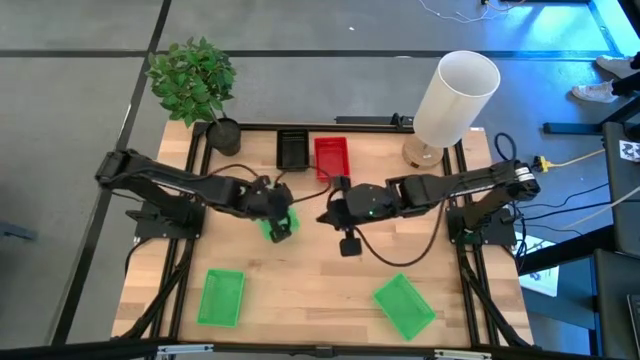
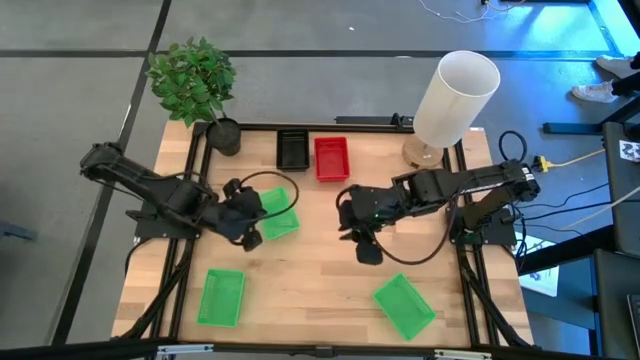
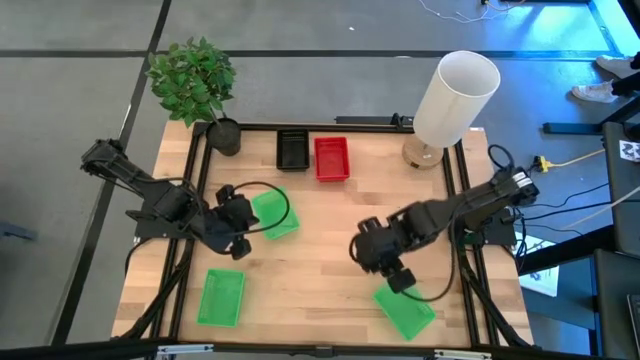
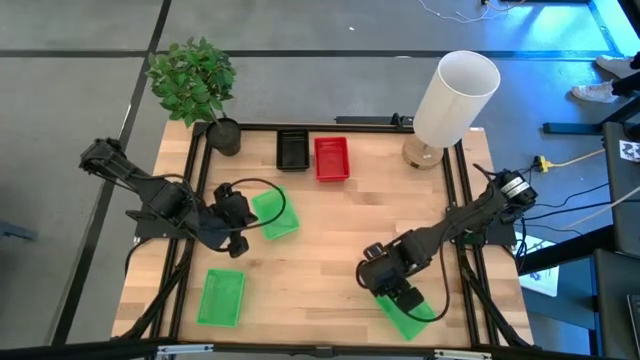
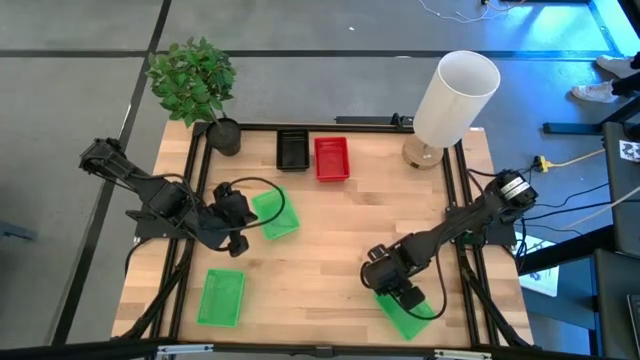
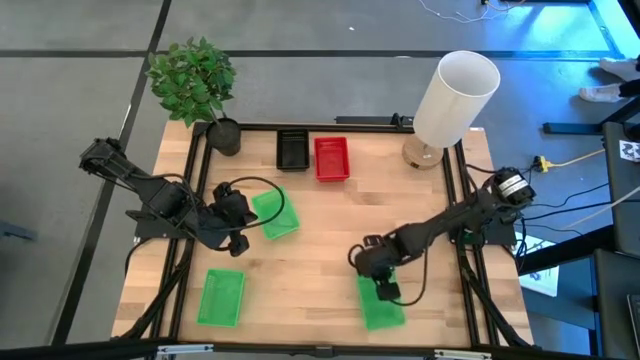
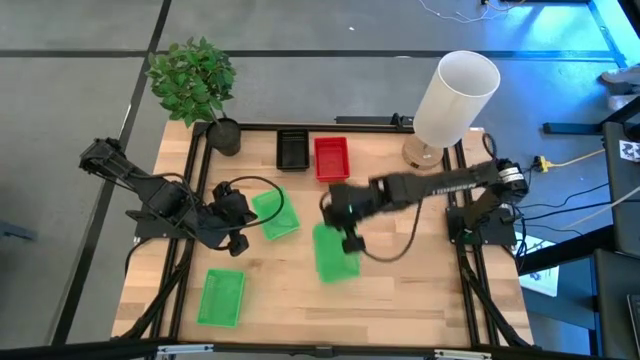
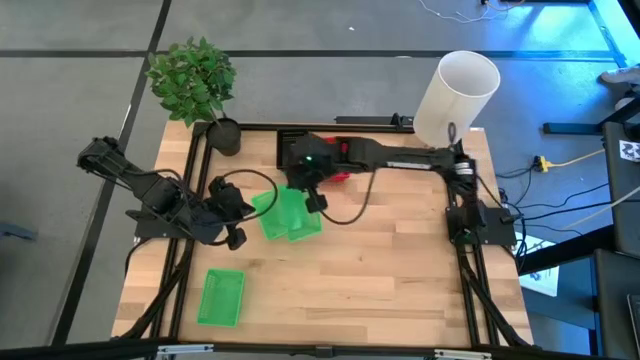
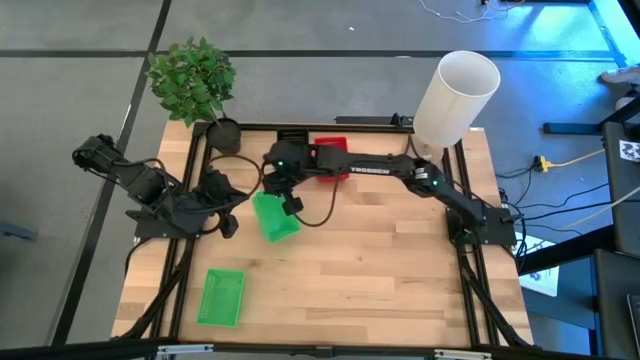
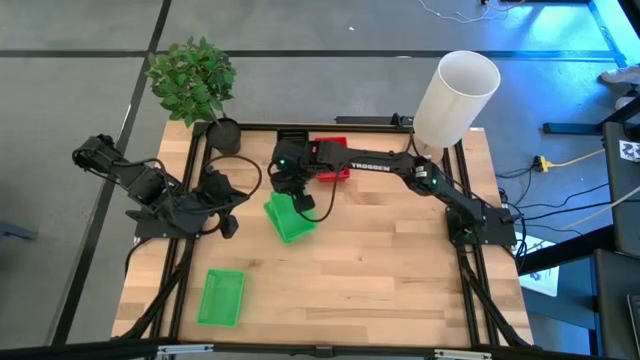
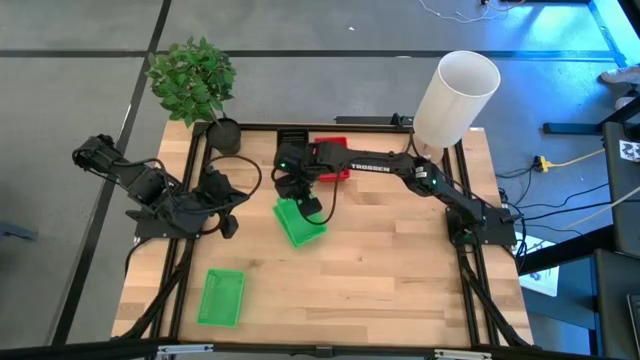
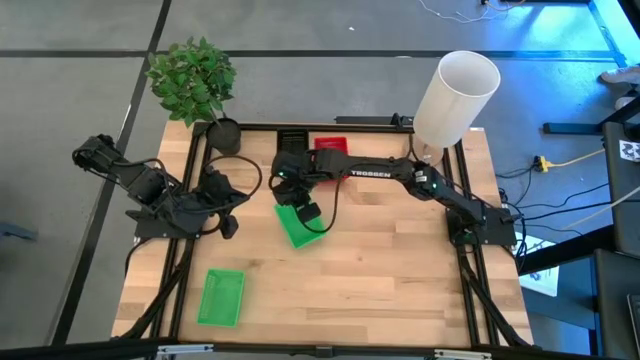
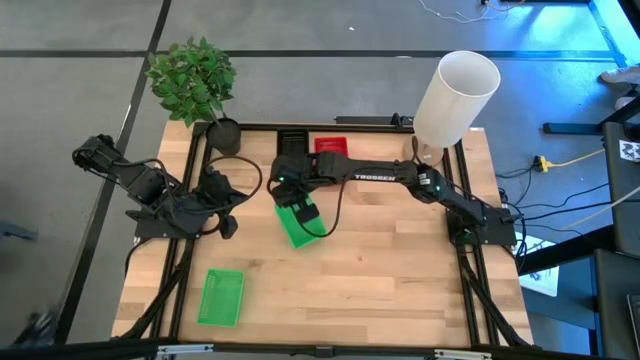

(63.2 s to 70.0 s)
Stack the bottom right green bin on the top left green bin

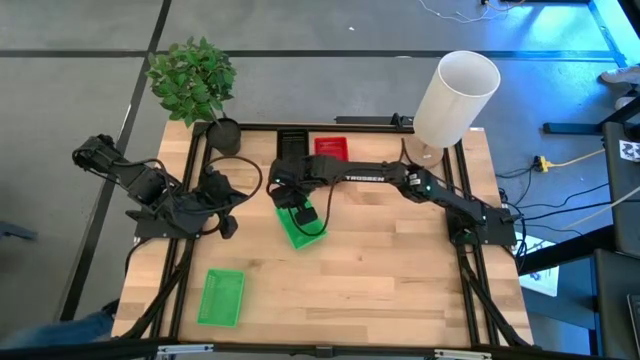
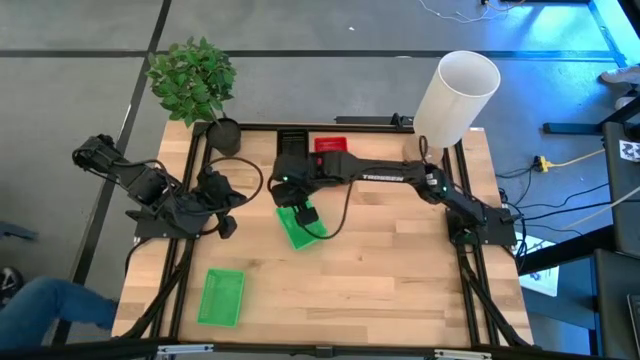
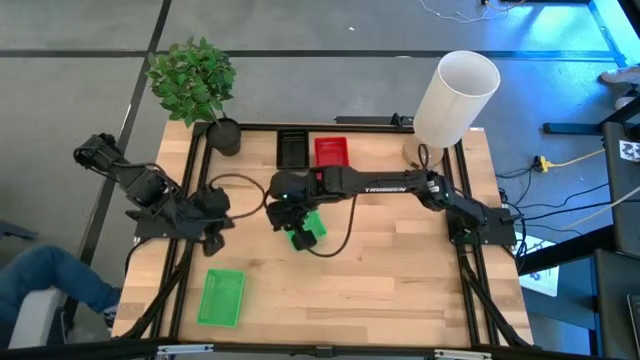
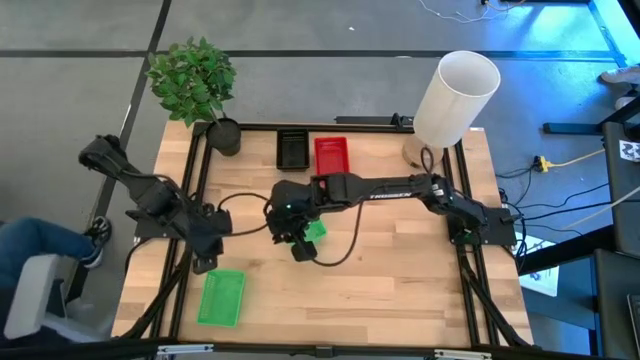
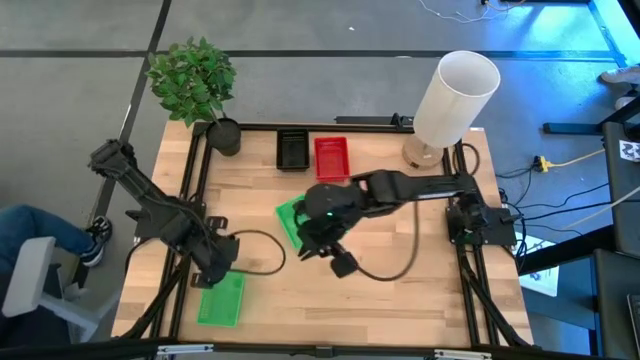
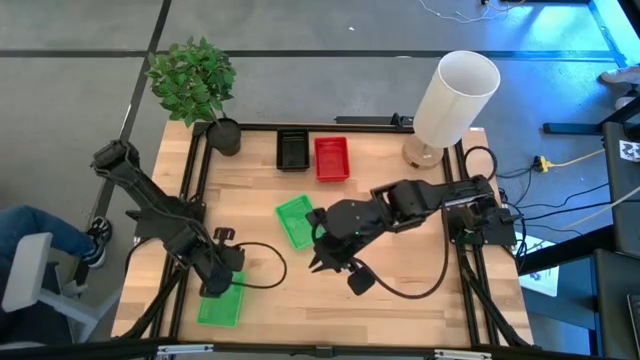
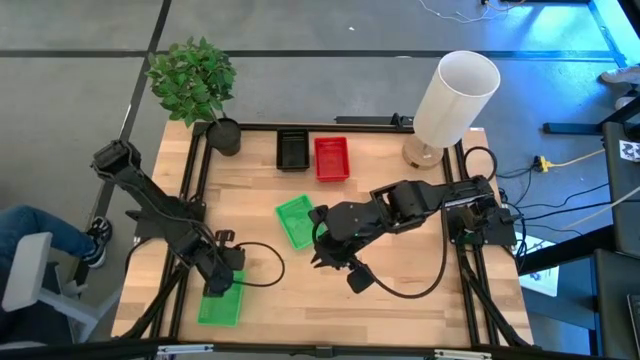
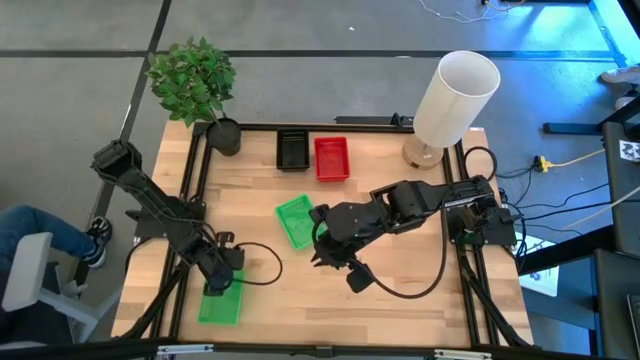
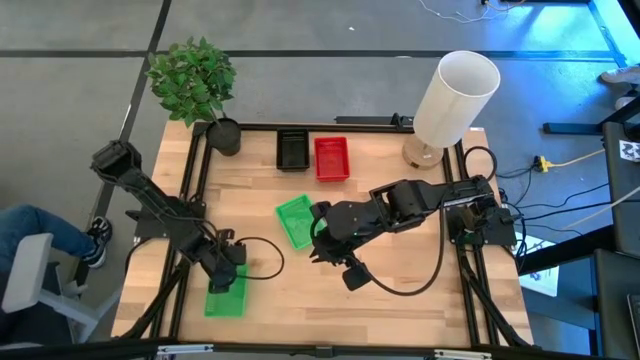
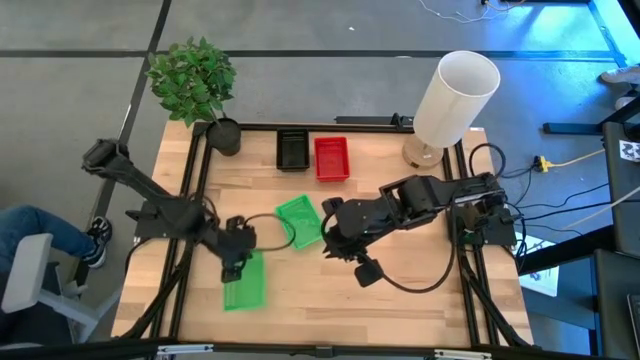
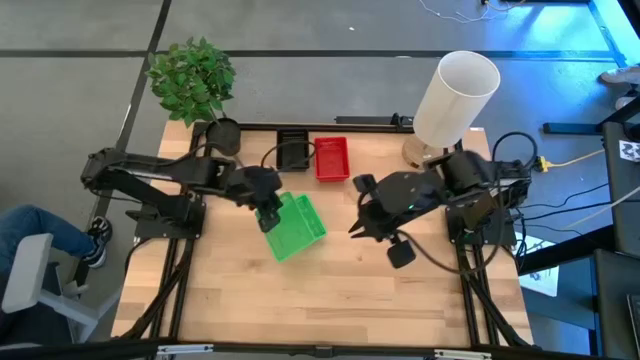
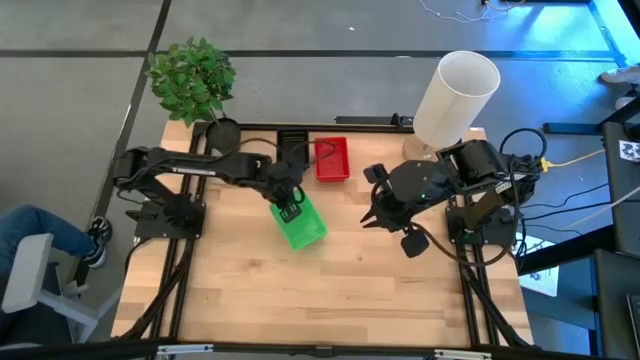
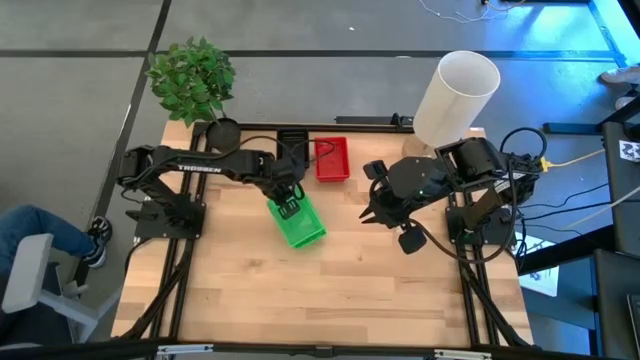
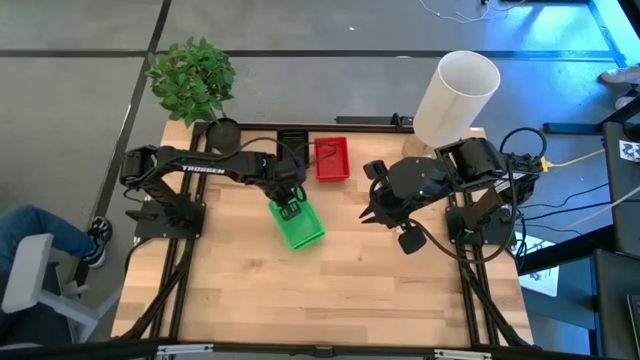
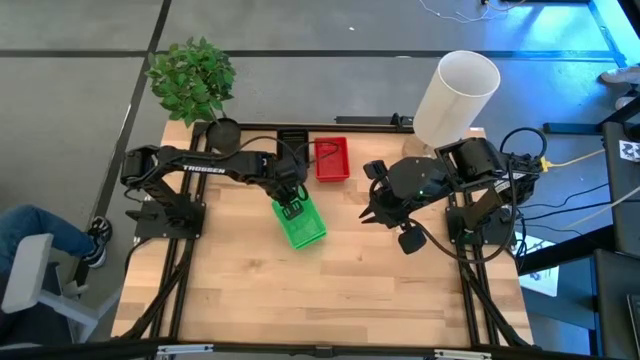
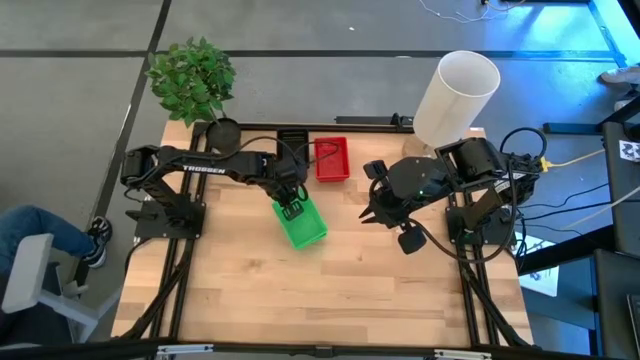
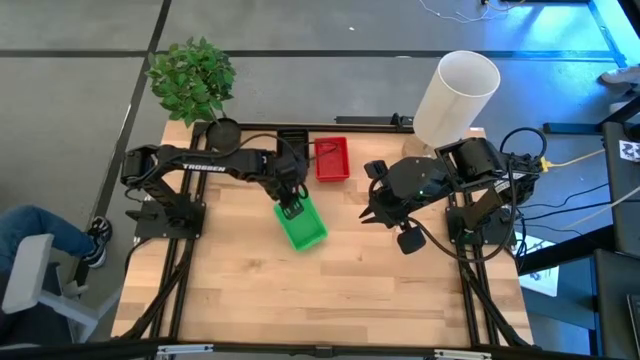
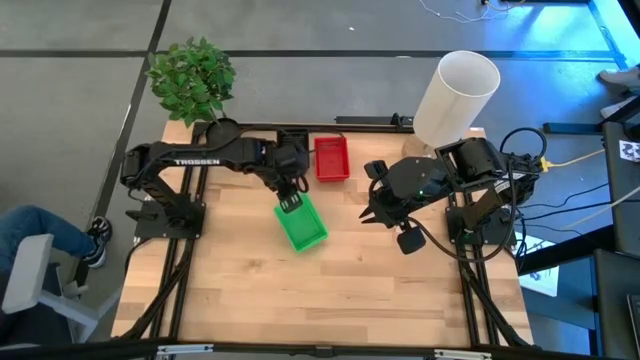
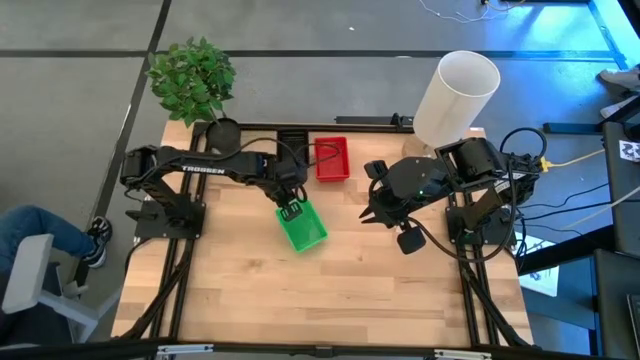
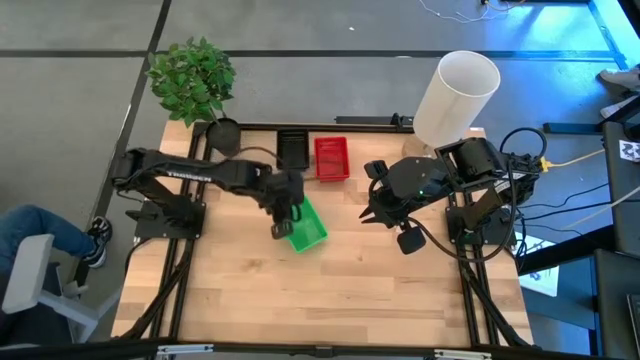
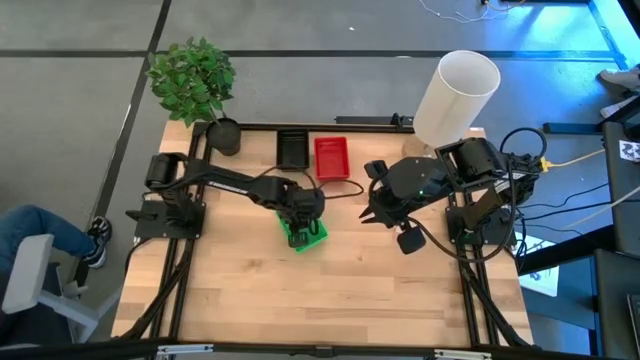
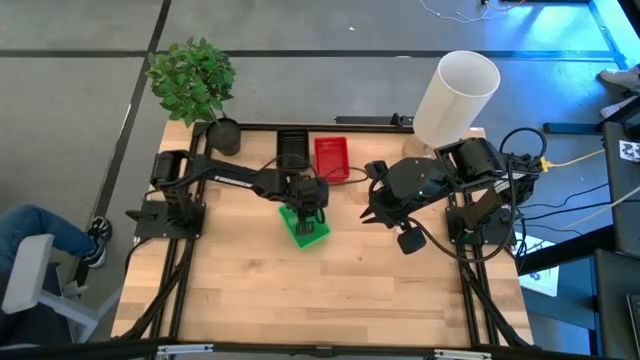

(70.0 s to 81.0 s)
Stack the bottom green bin on the top stacked green bins
